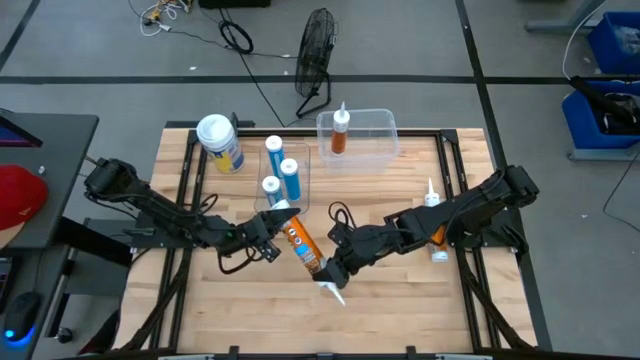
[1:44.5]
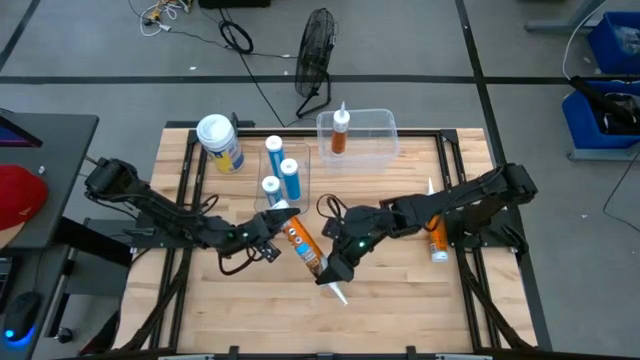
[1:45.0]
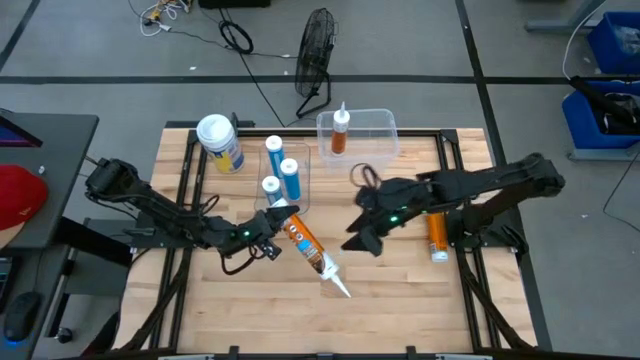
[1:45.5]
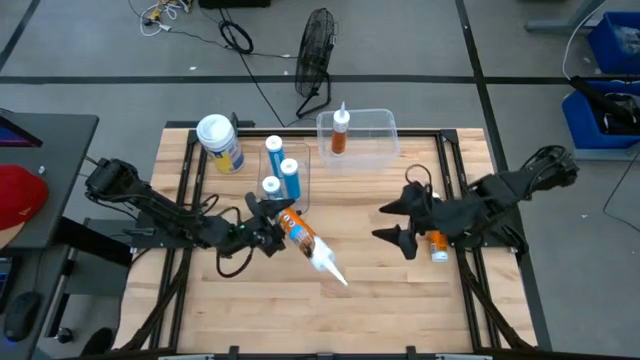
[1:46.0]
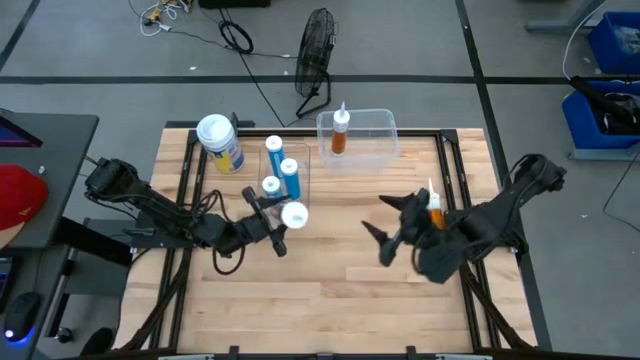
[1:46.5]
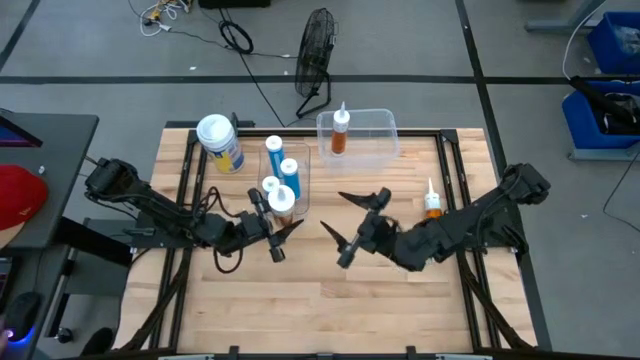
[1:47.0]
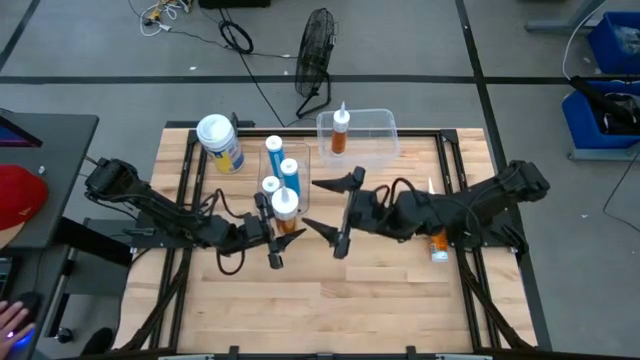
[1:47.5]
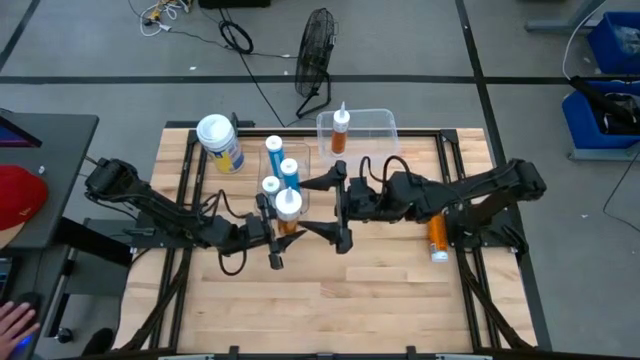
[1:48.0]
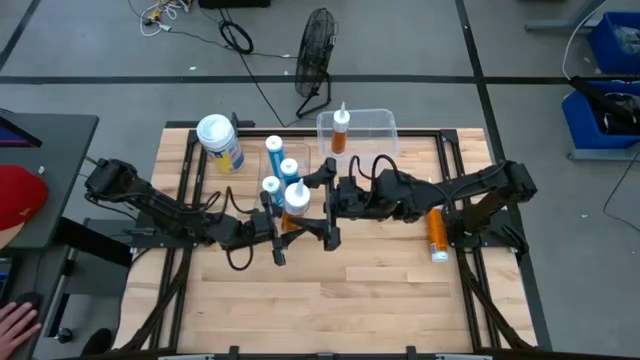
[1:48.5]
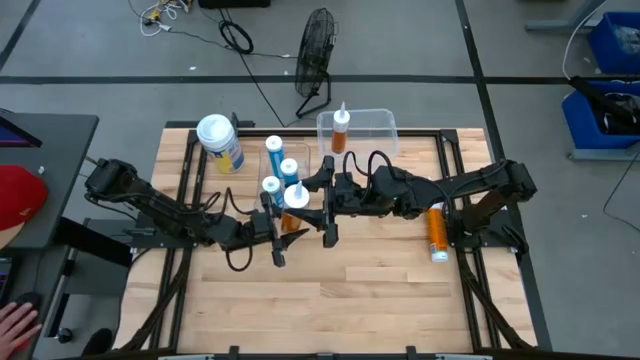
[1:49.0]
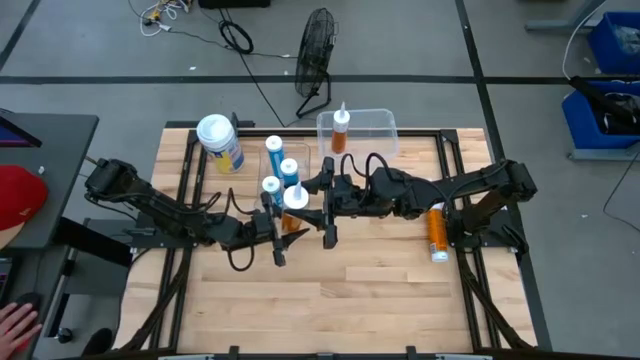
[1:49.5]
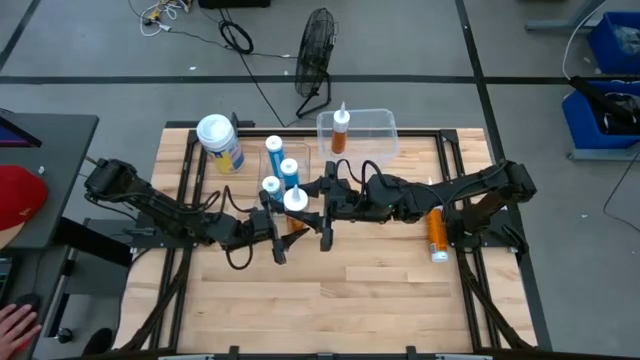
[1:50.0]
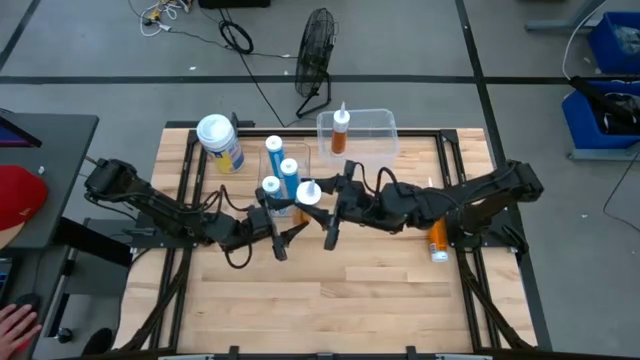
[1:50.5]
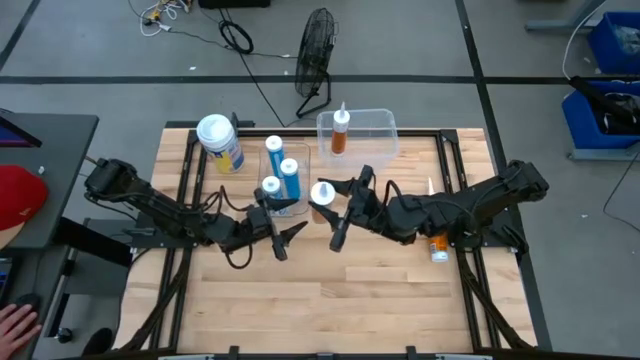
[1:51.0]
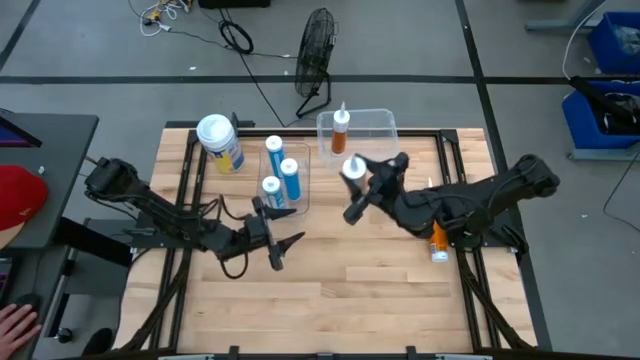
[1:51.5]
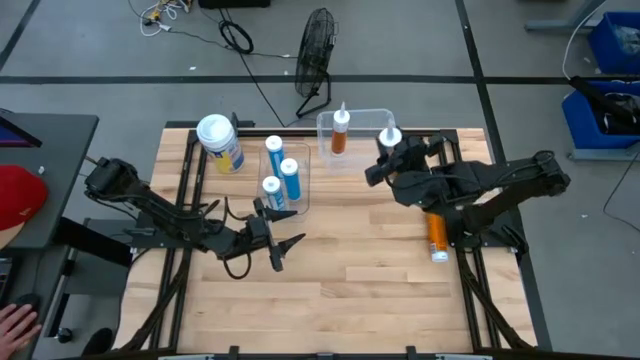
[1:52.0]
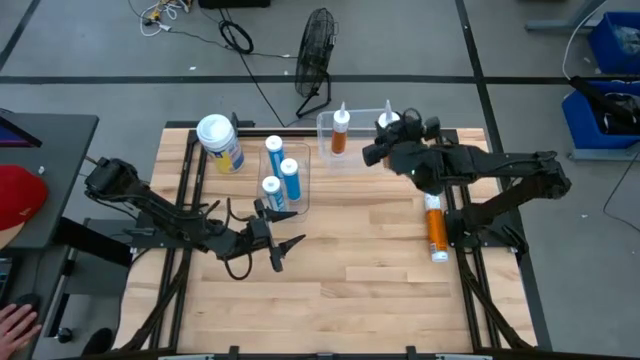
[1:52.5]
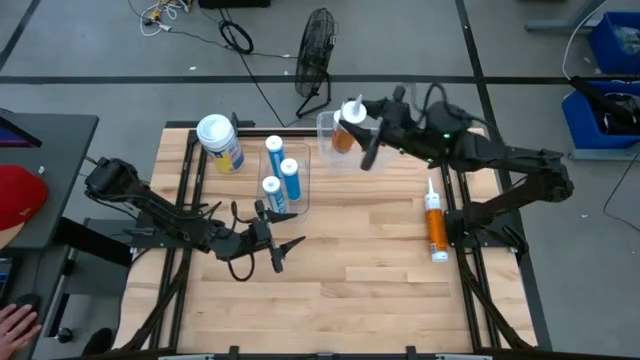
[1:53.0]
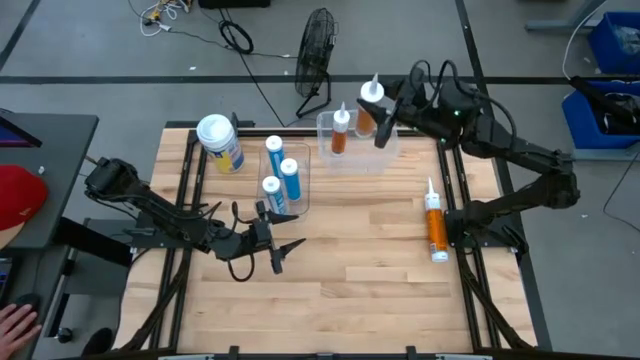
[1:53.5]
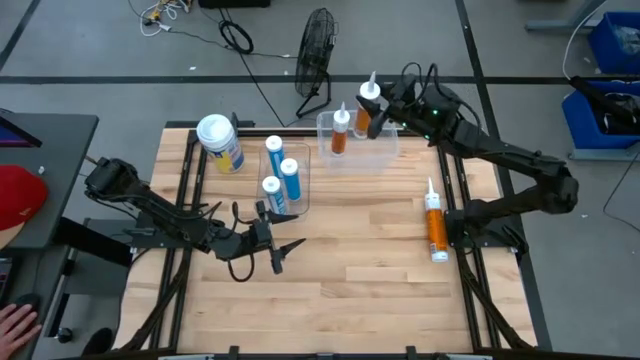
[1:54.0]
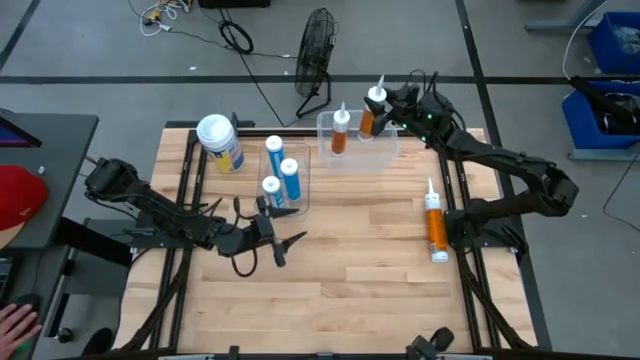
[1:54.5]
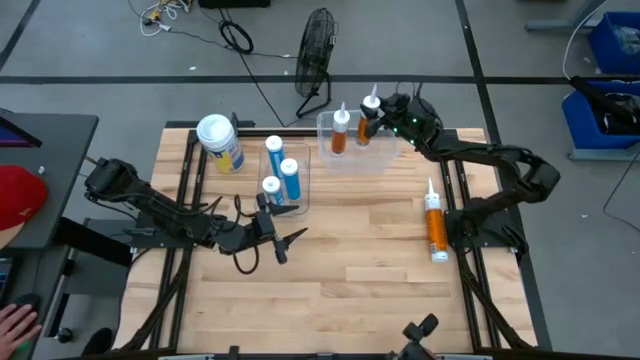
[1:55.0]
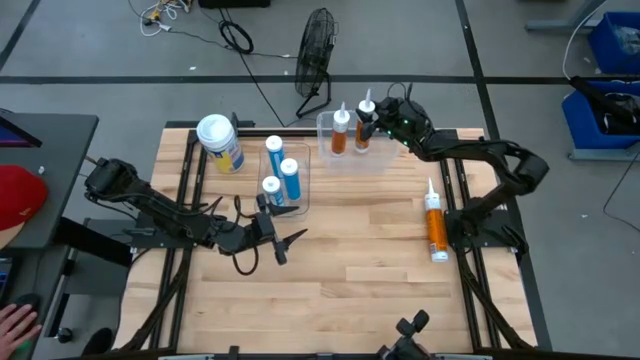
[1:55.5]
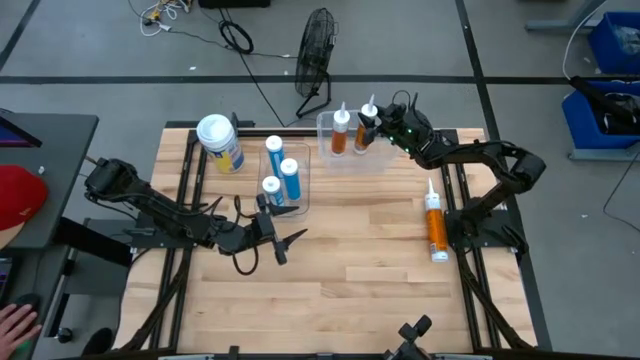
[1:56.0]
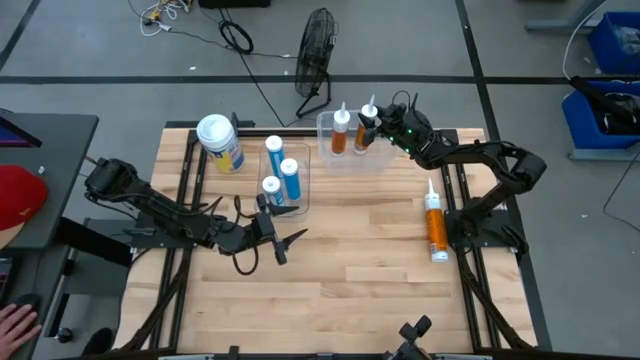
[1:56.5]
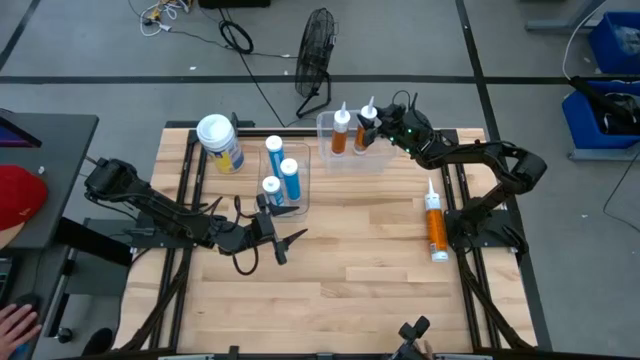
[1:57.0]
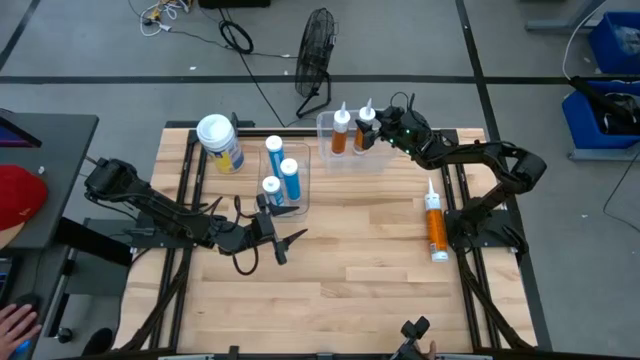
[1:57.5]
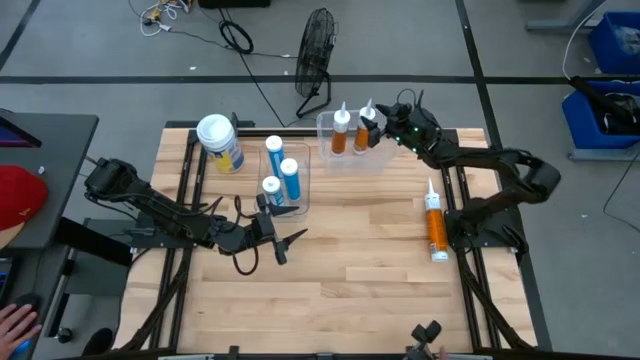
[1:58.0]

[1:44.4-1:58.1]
Task: Pick & place silicon tubes, Sealant and Lysol wipes
Put the bottom orange sealant into the right transparent bin

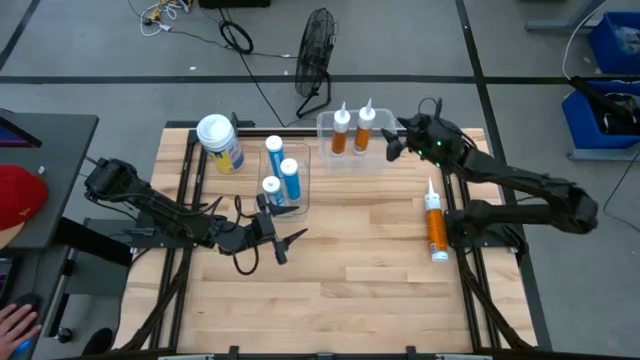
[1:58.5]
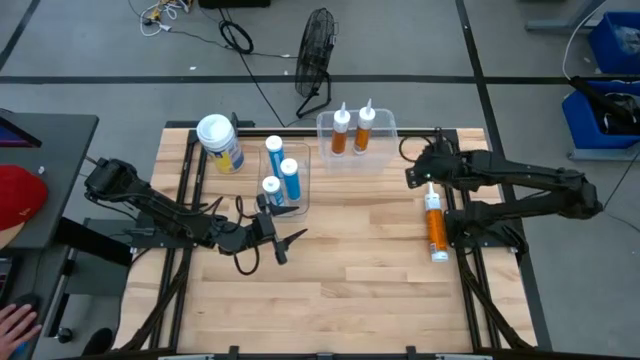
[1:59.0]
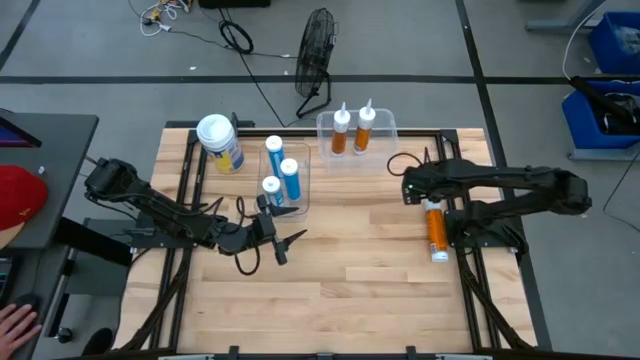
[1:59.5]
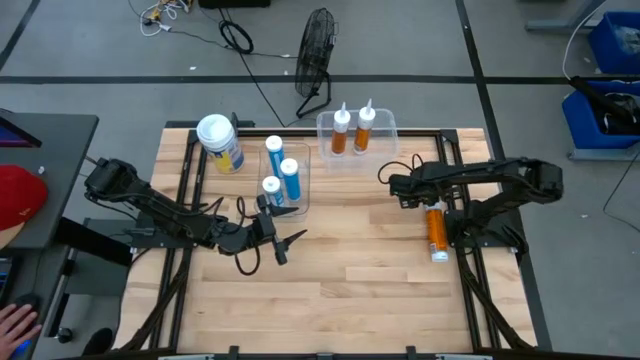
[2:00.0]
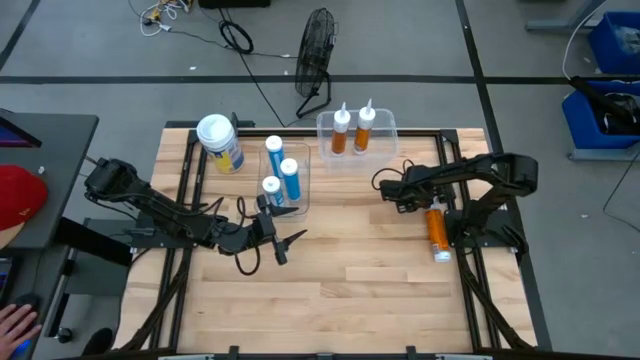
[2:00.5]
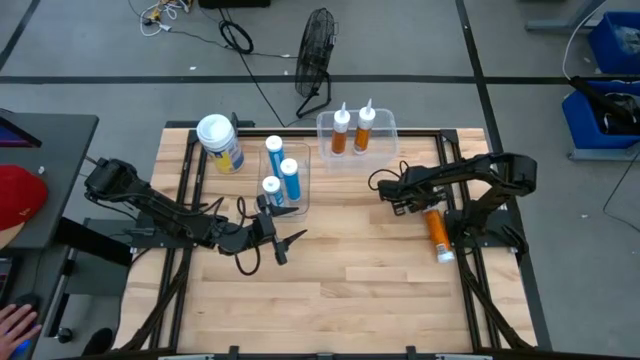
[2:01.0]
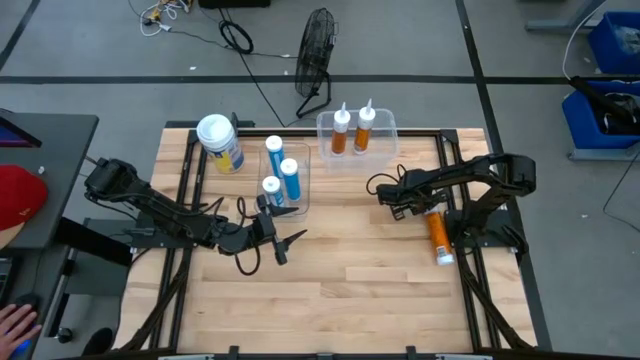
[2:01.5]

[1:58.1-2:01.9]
Put the orange sealant into the right transparent bin

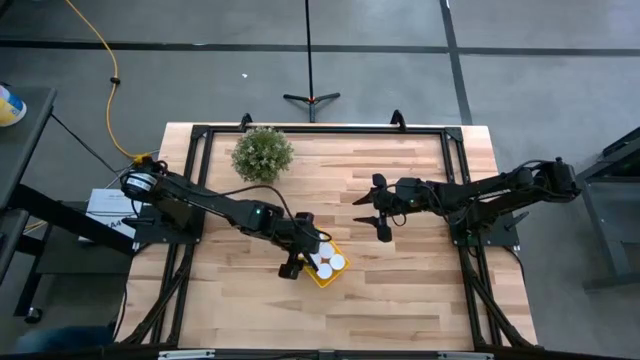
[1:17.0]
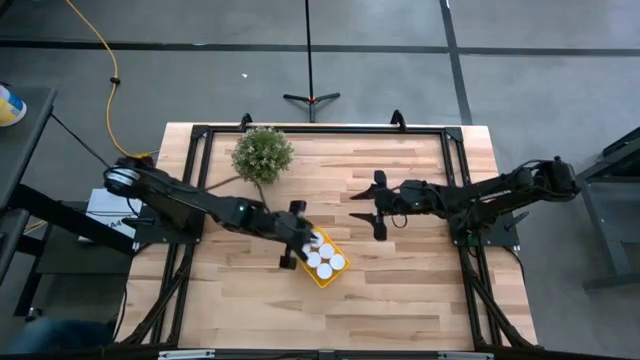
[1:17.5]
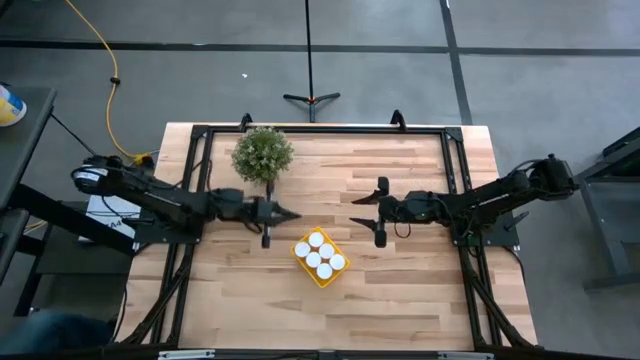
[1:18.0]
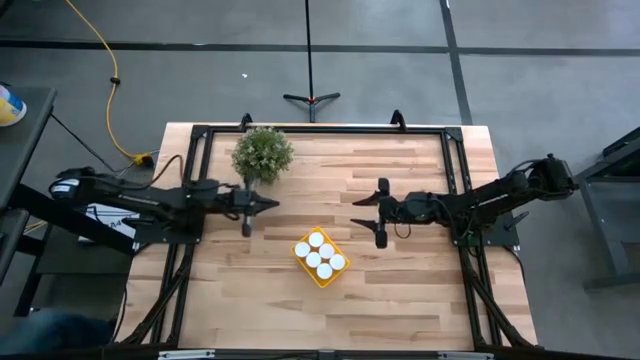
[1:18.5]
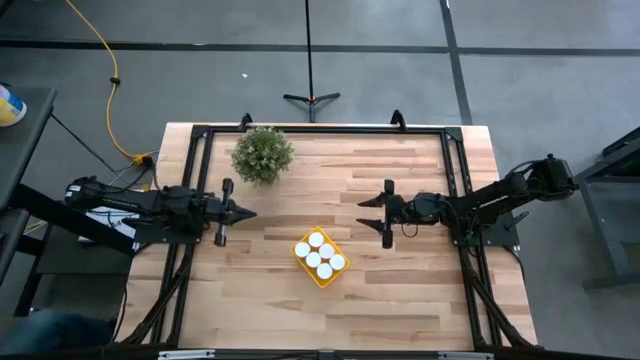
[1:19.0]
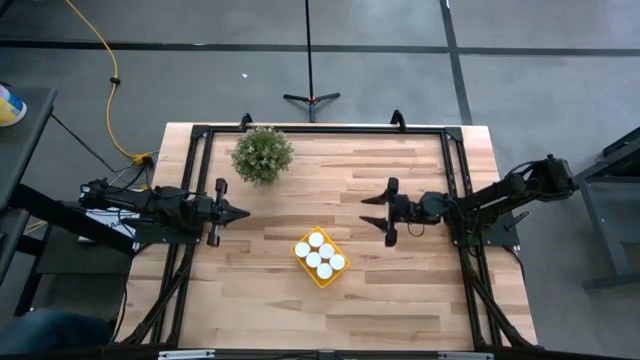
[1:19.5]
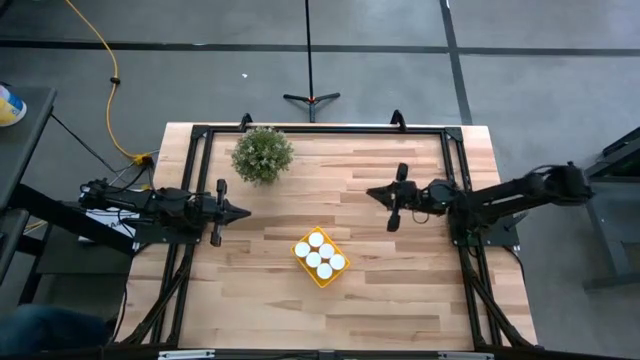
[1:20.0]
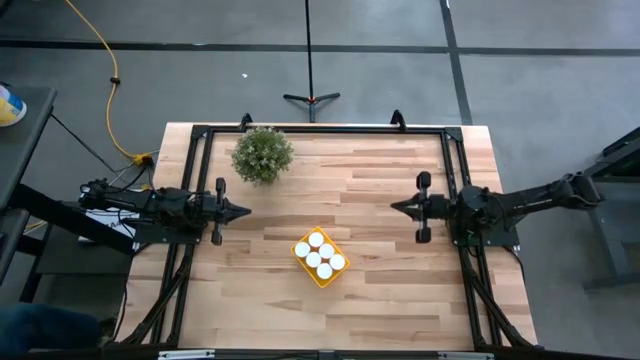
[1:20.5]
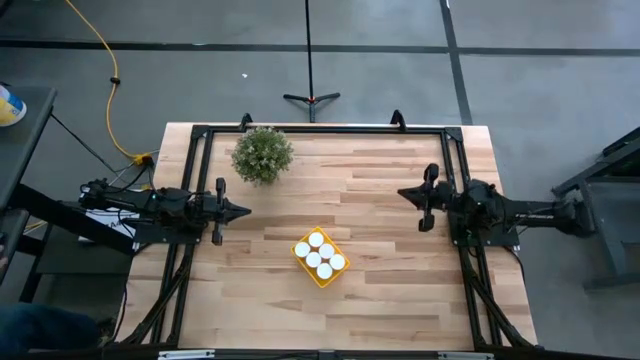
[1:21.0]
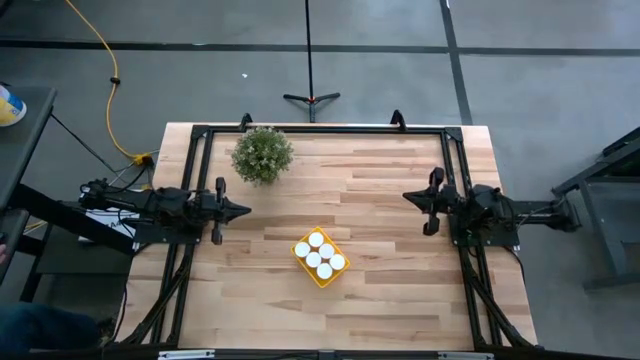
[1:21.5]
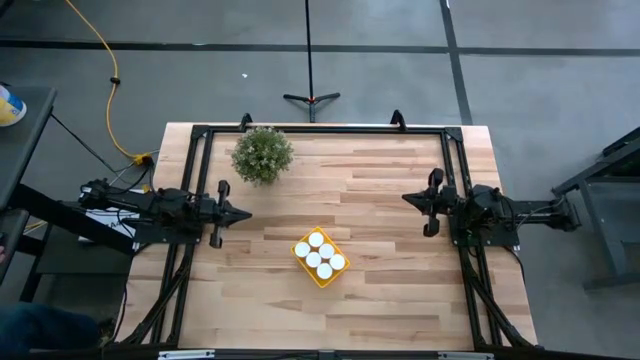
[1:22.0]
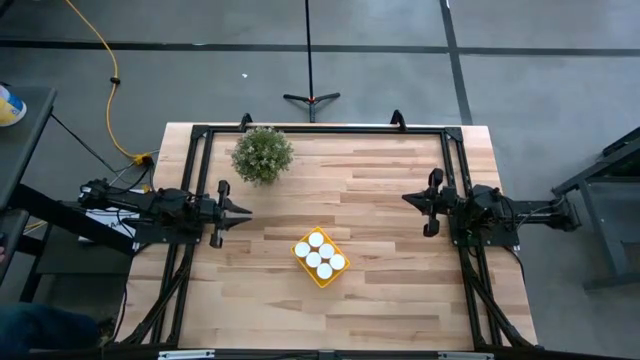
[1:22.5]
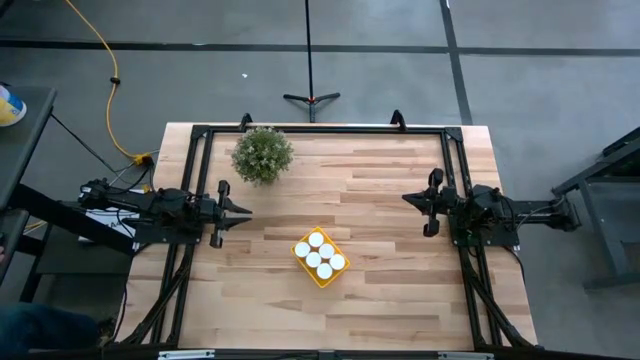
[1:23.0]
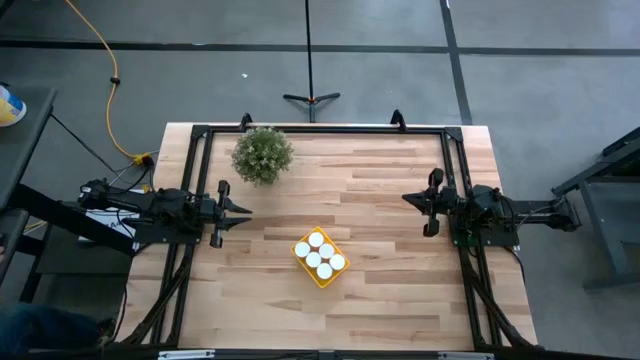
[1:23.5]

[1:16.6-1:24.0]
Task: Pick and place pill bottles into a basket
Return to Home Position
